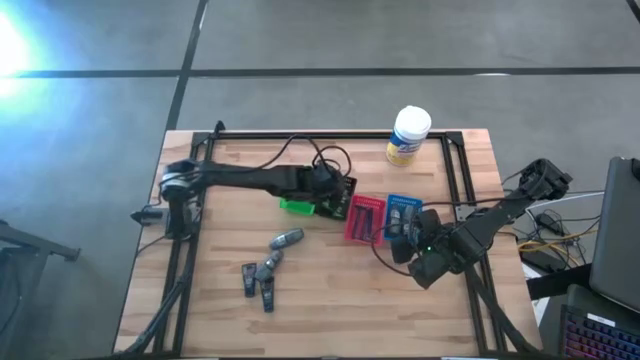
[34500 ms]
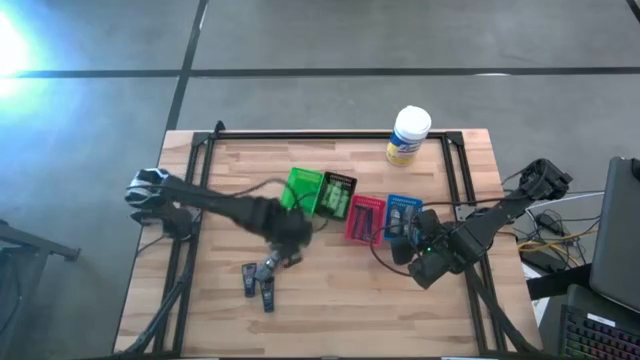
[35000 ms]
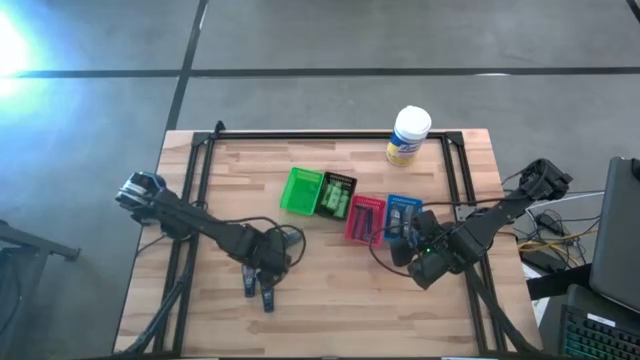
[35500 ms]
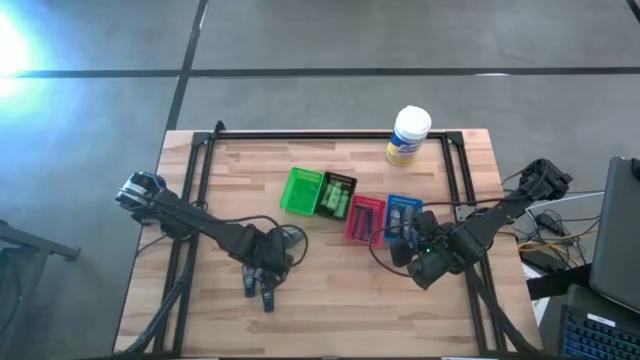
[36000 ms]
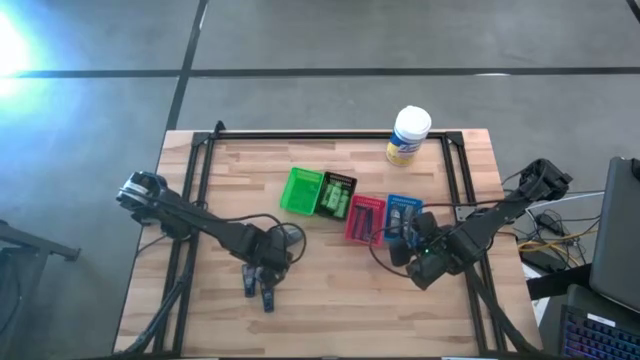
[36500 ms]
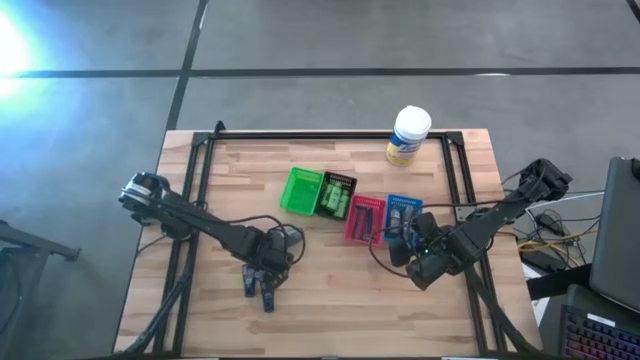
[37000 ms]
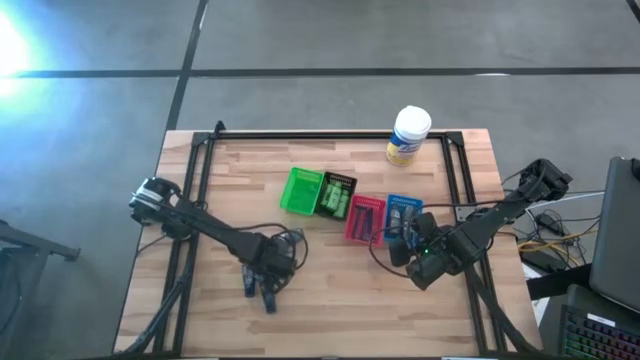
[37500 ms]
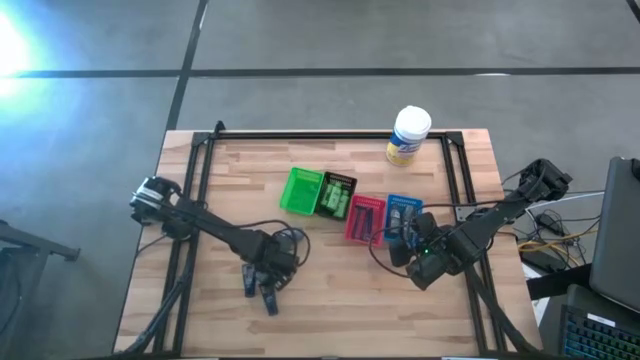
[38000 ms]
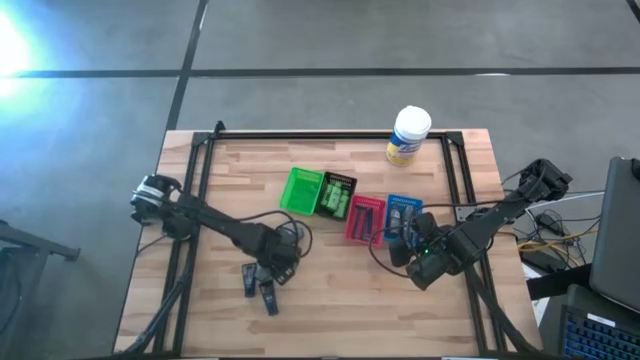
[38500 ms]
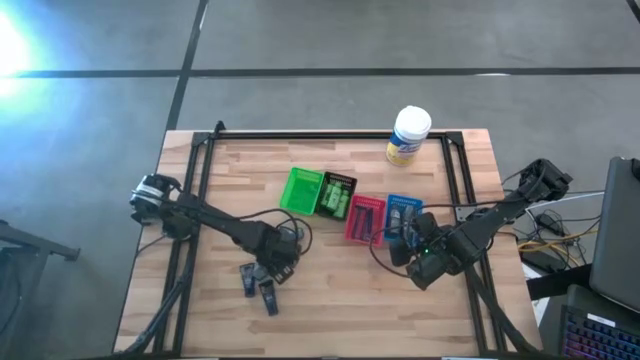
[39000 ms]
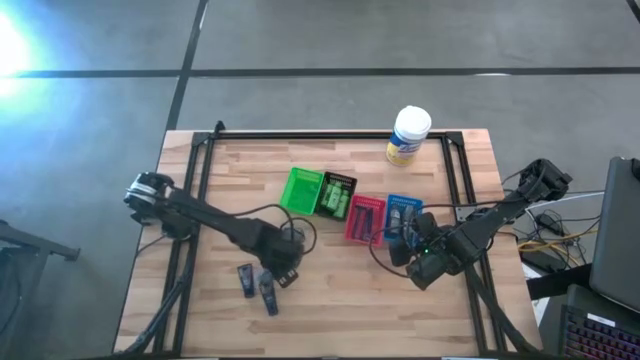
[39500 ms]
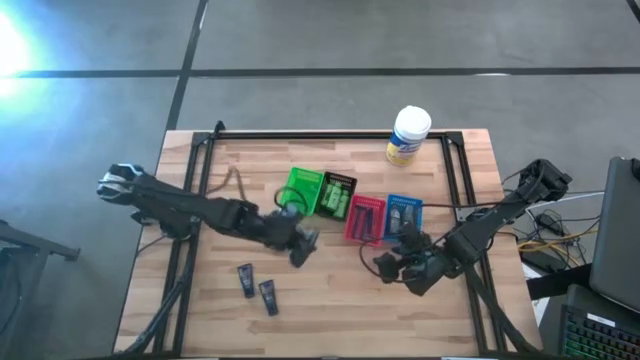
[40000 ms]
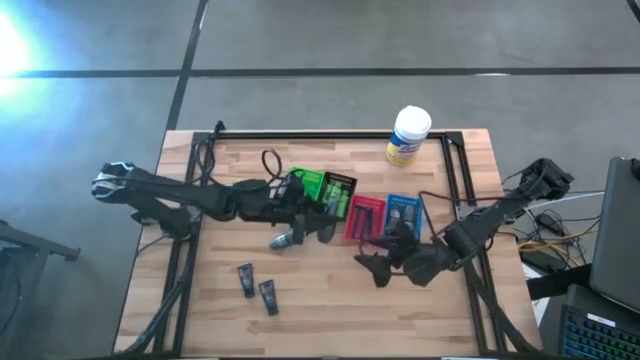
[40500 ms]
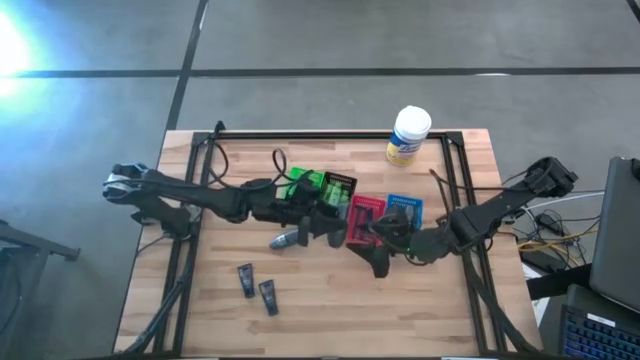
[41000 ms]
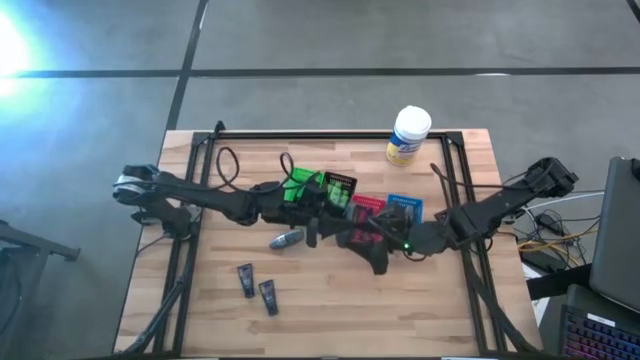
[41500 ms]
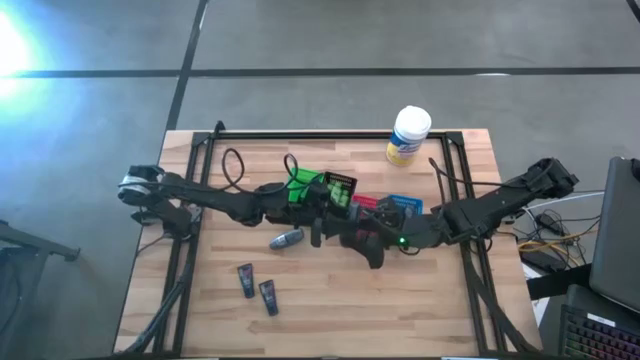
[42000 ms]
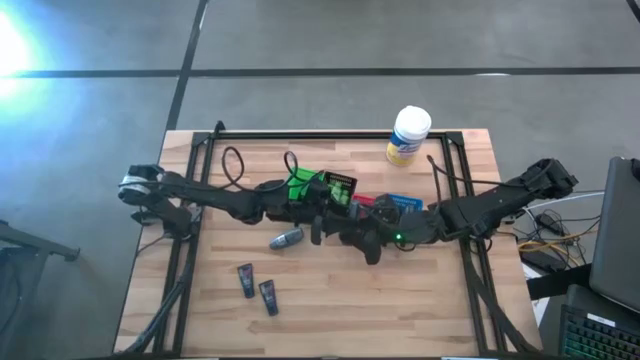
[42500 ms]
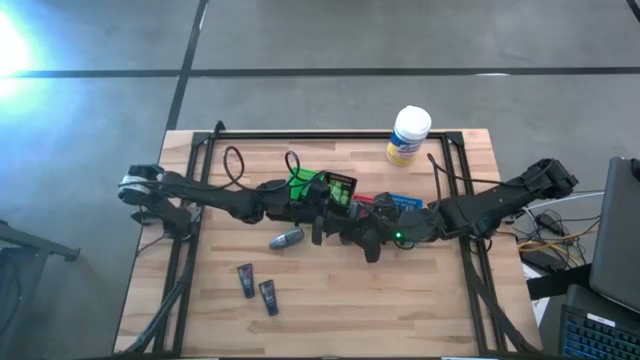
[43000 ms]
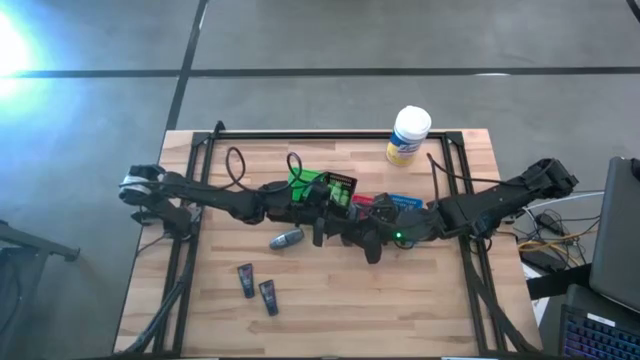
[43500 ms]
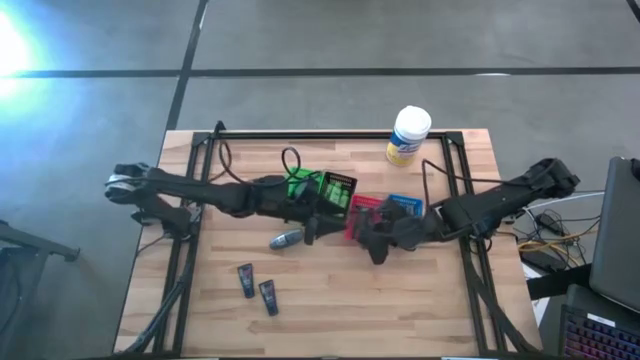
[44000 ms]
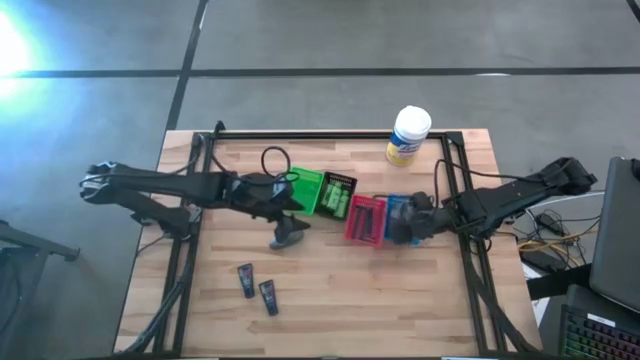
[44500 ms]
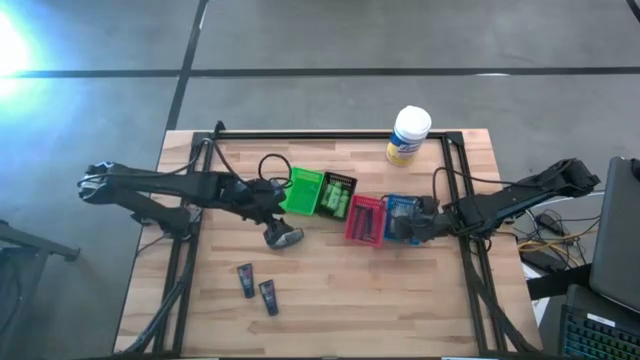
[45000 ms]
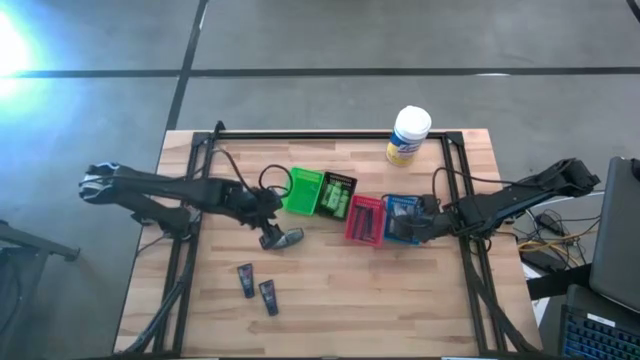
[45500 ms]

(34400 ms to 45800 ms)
Task: Pick & Place Travel size toiletries
Put the deodorant into the blue bin

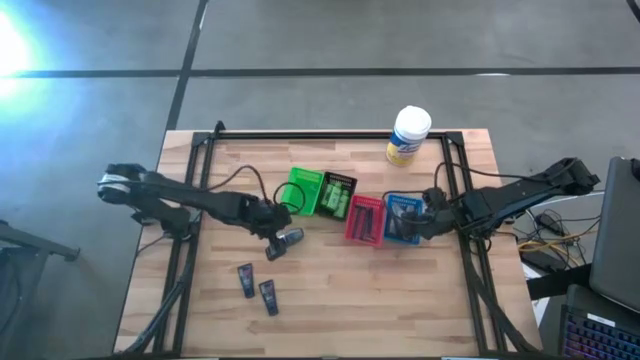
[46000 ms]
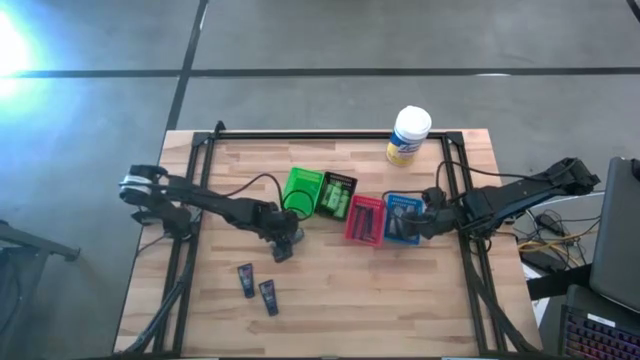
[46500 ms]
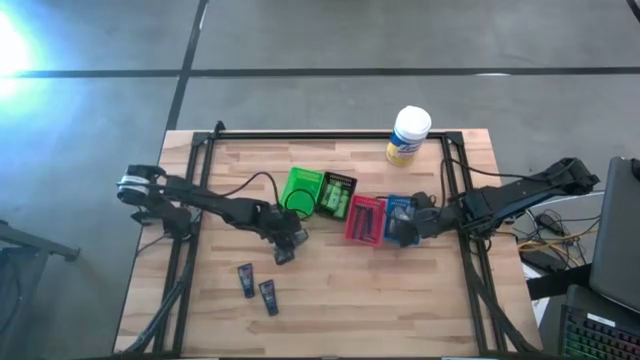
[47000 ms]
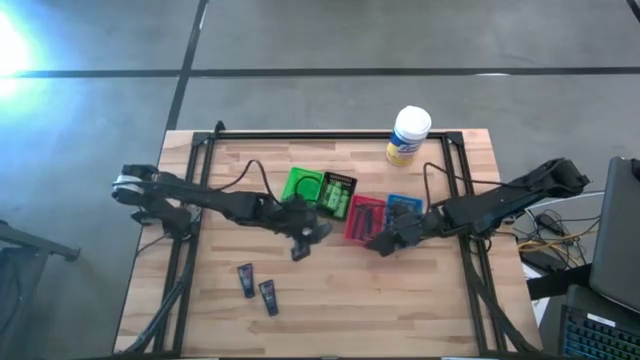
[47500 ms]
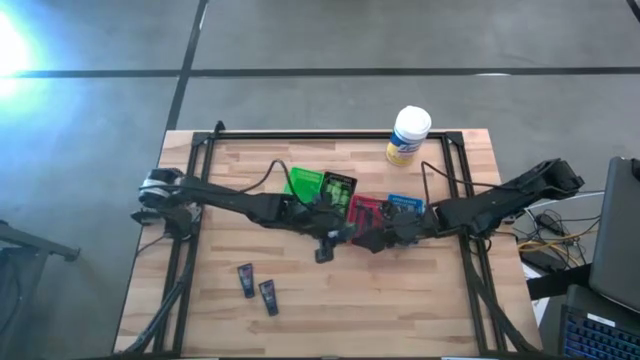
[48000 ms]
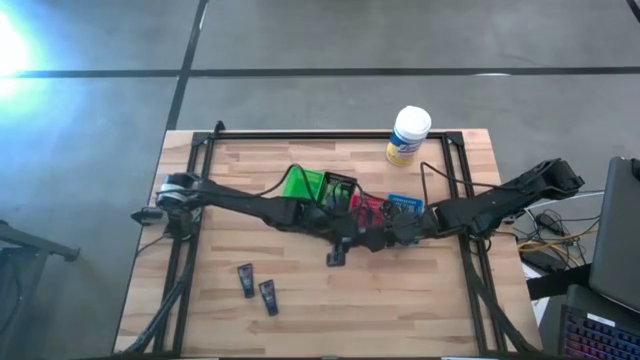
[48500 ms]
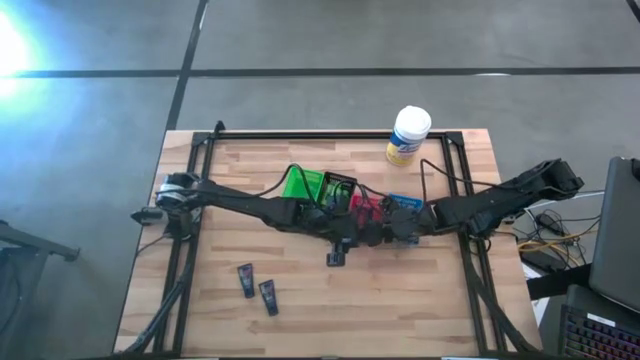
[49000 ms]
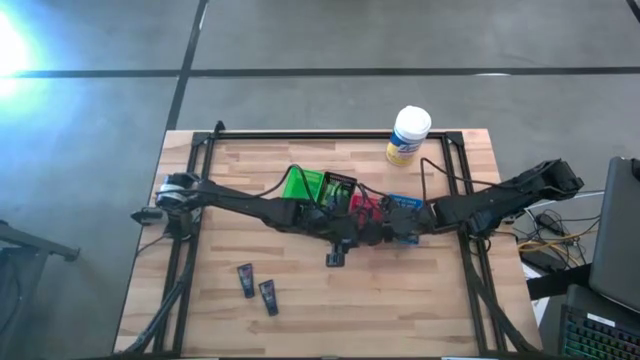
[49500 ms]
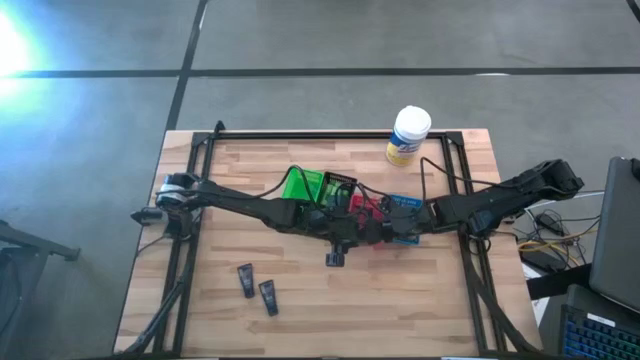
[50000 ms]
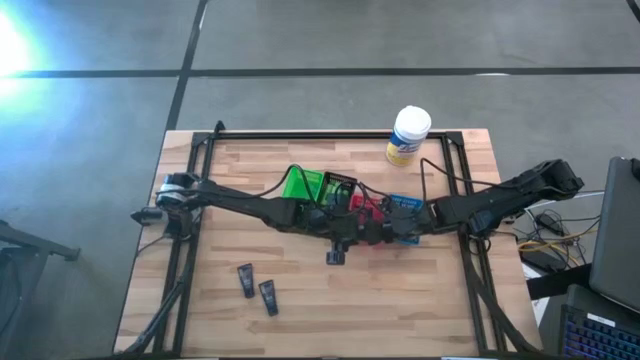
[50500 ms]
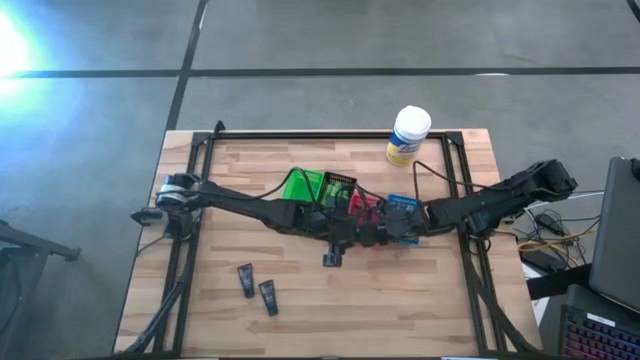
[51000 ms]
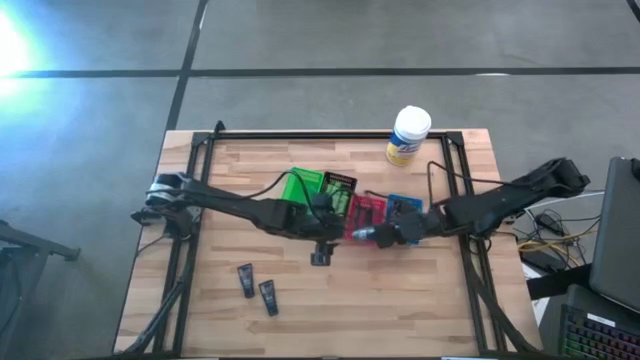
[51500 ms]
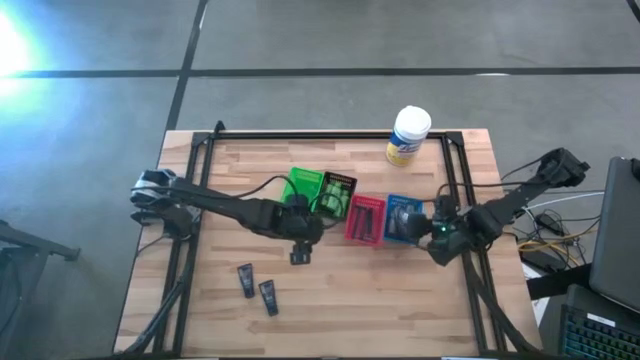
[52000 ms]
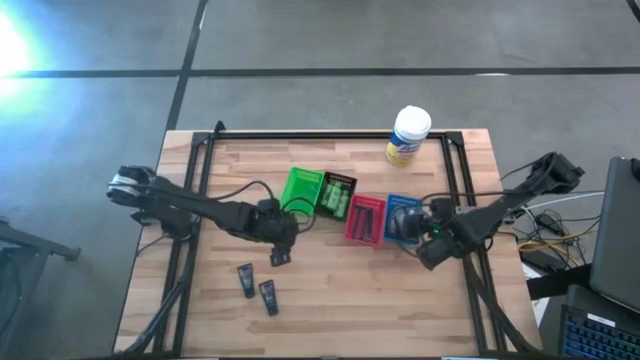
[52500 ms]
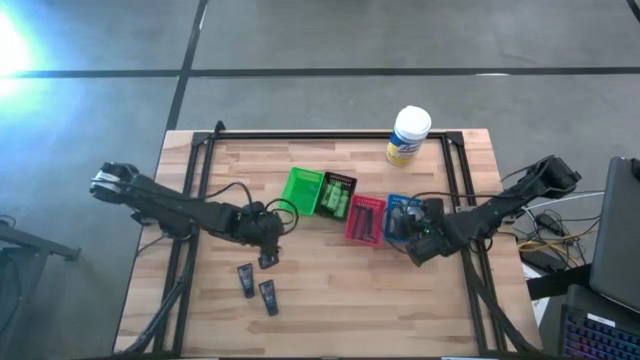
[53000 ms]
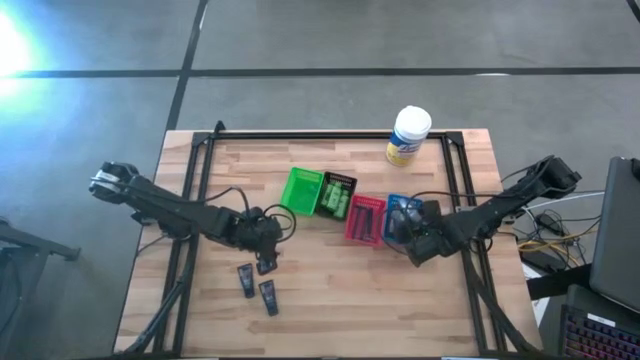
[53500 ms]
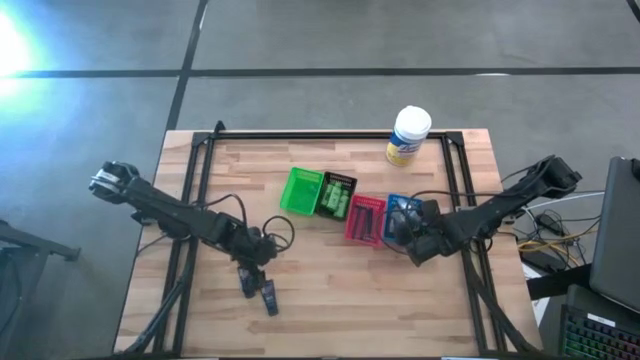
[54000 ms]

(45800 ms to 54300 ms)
Put the deodorant into the blue bin

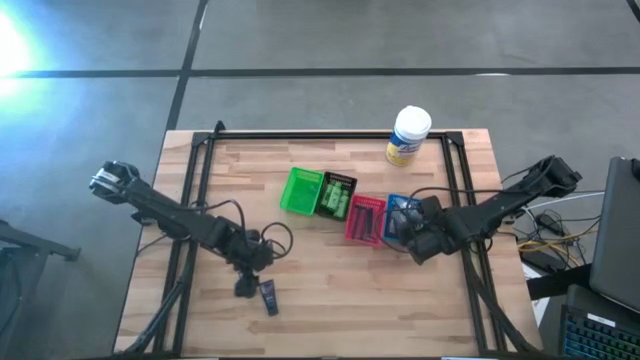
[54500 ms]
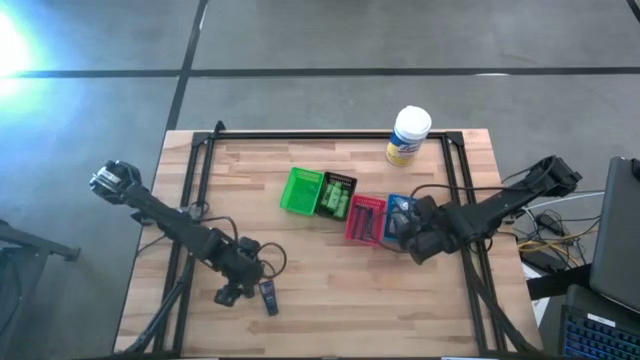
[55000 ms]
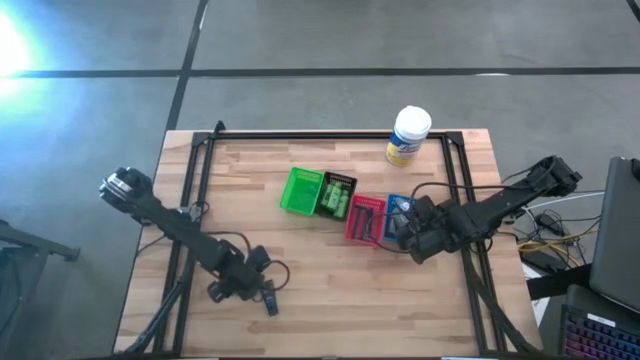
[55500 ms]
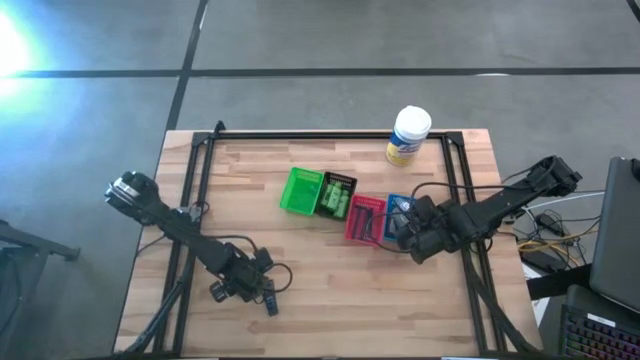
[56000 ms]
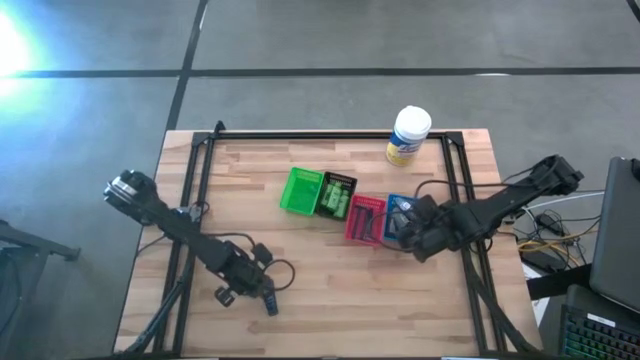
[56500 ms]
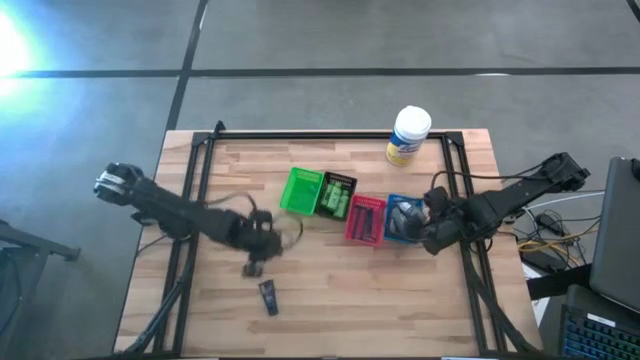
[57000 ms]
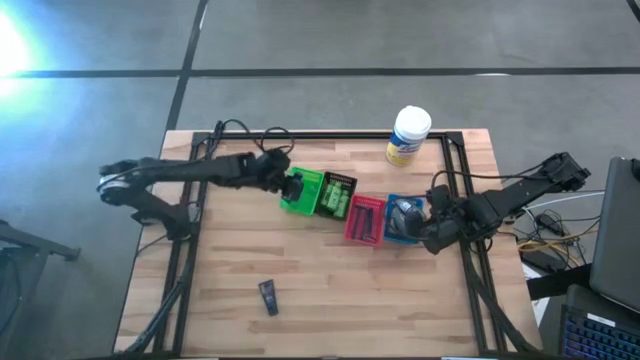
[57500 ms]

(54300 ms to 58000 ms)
Put the shave cream into the green bin
